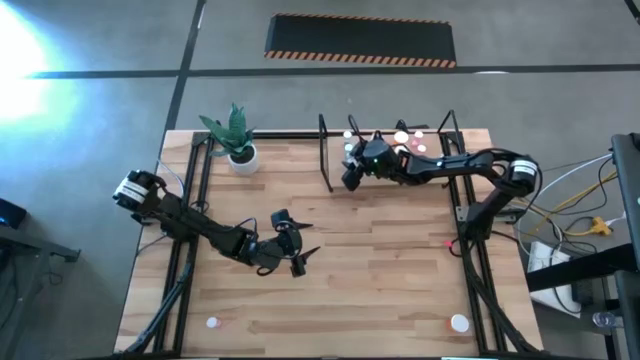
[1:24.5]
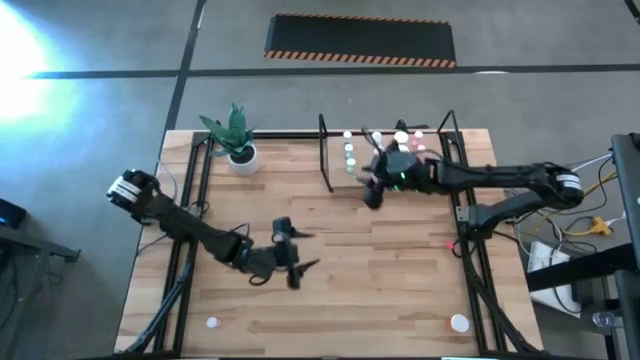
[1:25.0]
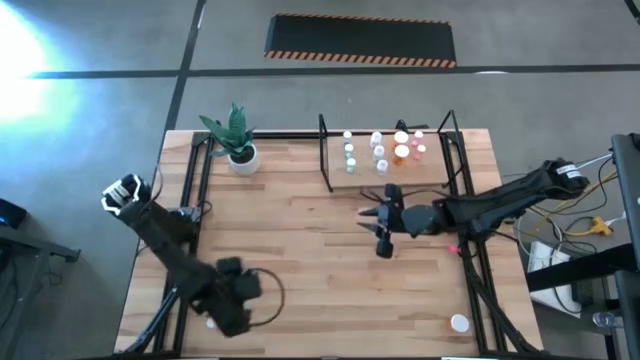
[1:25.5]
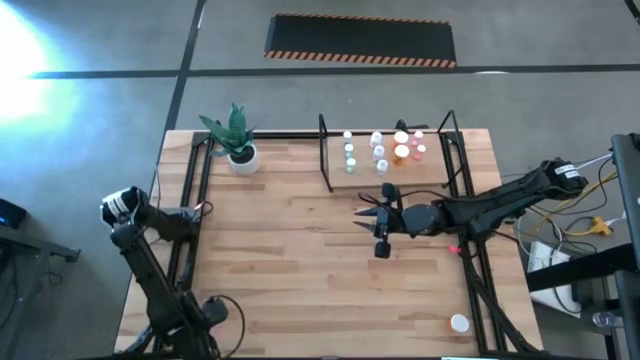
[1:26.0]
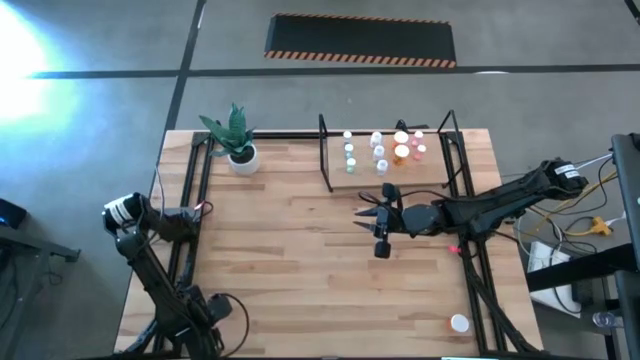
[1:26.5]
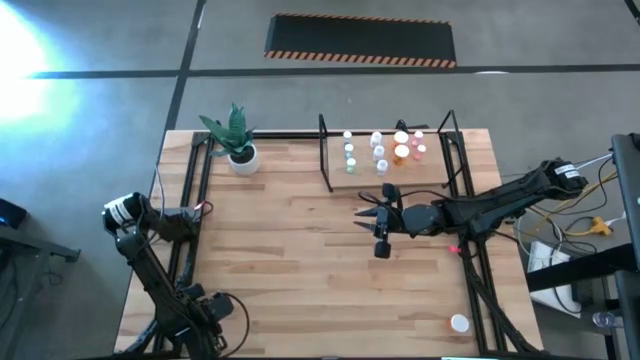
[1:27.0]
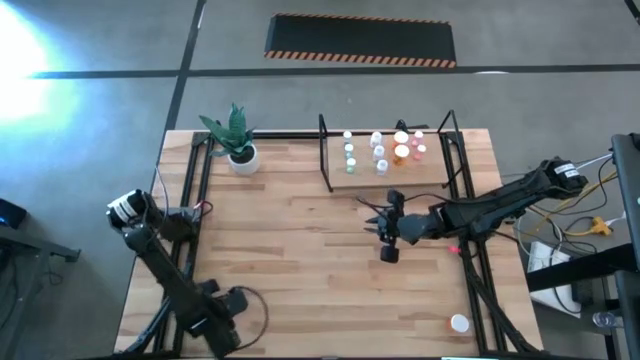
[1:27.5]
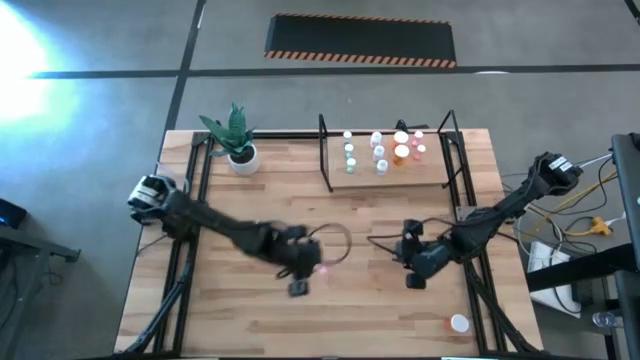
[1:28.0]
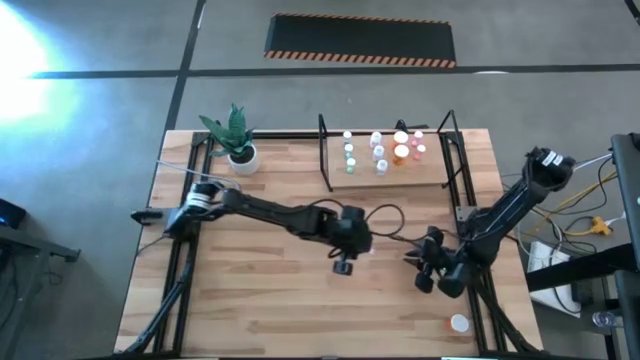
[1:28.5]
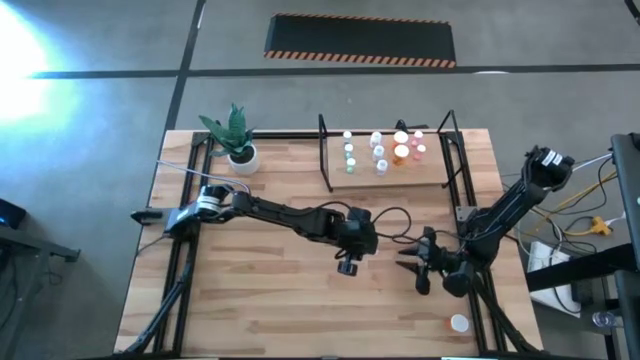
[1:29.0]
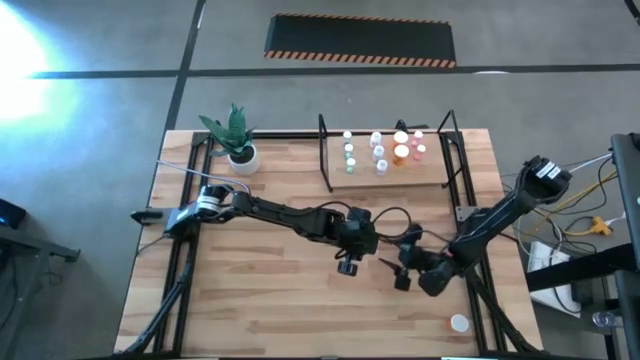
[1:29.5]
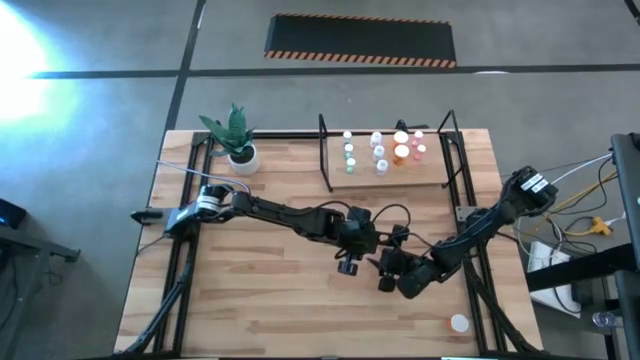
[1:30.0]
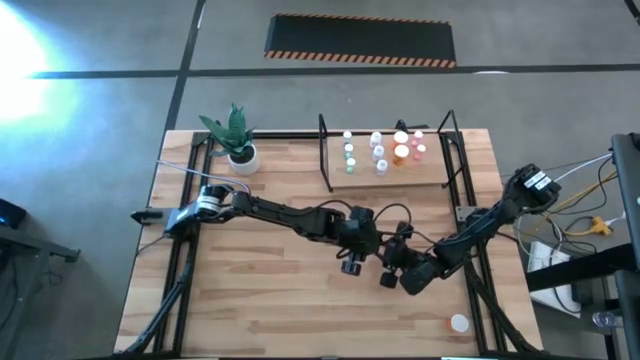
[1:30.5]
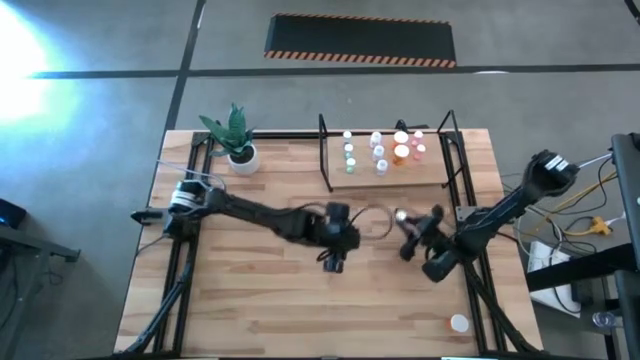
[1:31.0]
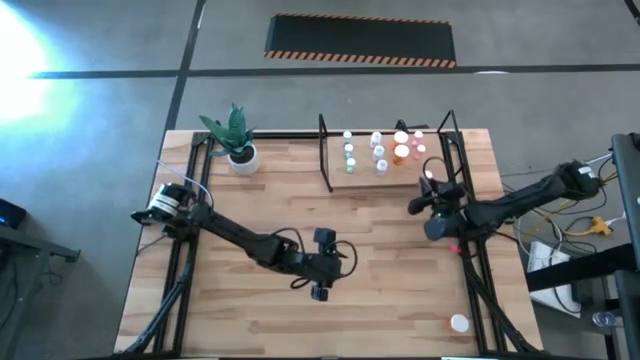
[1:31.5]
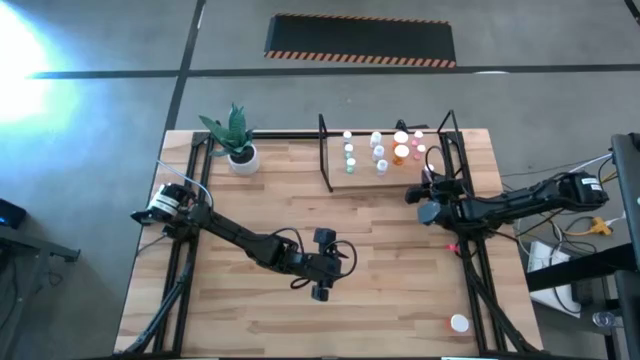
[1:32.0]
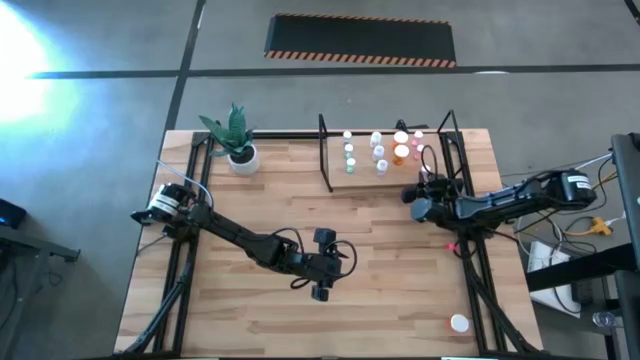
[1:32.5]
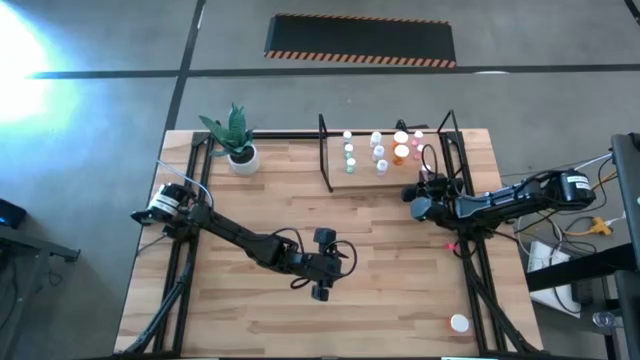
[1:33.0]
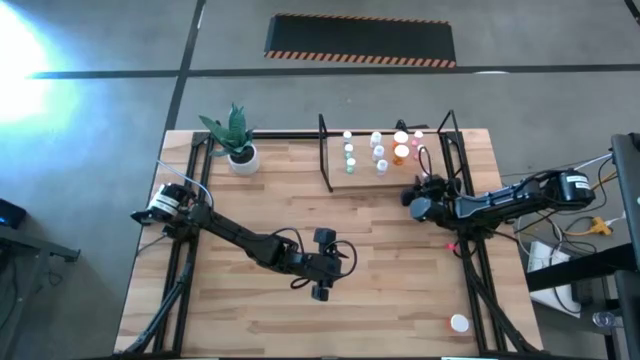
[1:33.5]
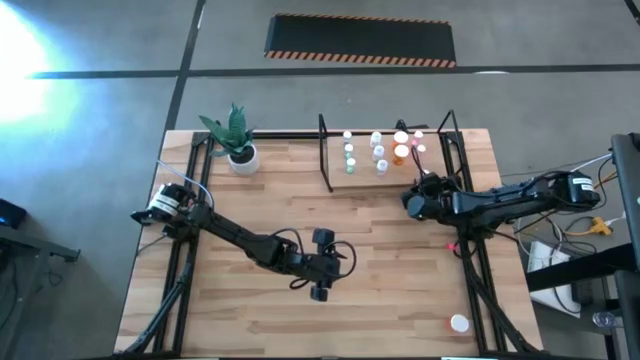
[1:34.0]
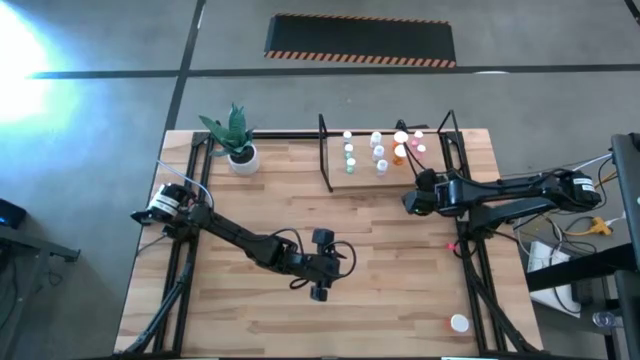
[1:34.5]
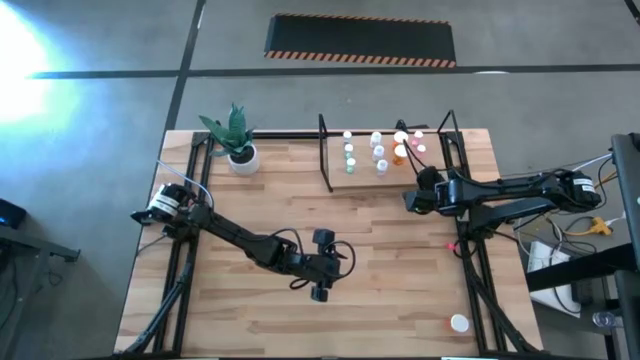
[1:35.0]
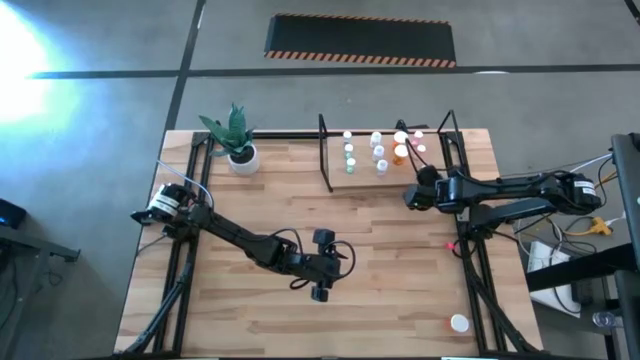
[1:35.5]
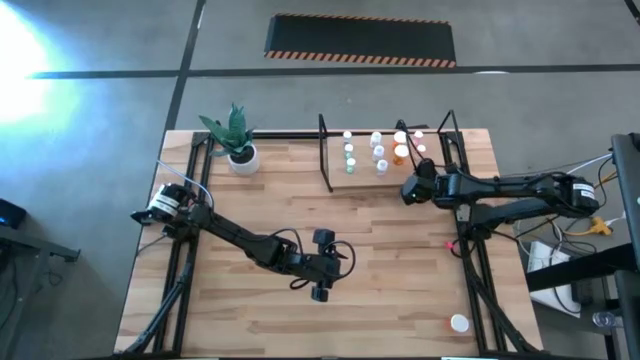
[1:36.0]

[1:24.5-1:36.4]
Task: Pick and place medicine bottles onto shelf by color
Put the pink pill bottle on the shelf aligned with the other pink pill bottle

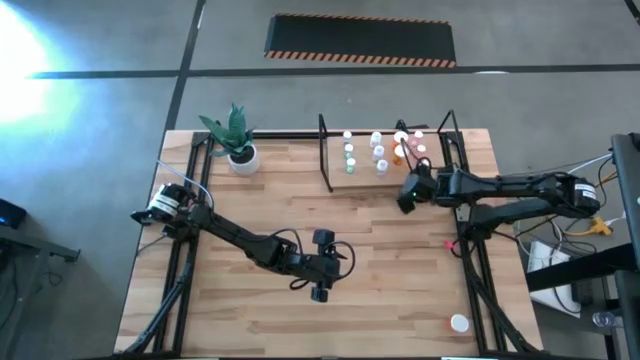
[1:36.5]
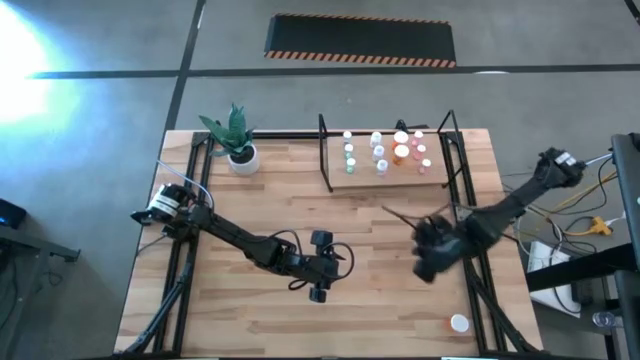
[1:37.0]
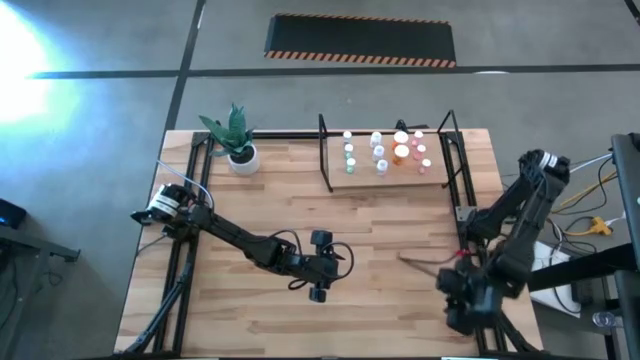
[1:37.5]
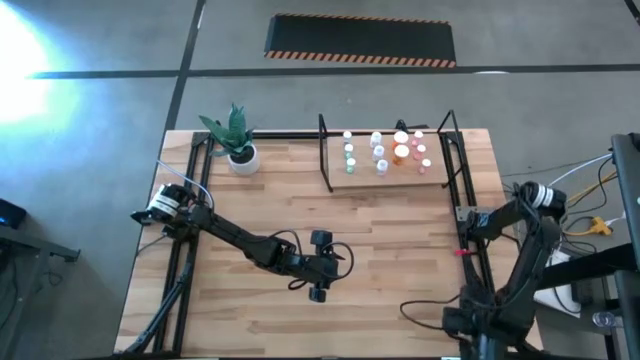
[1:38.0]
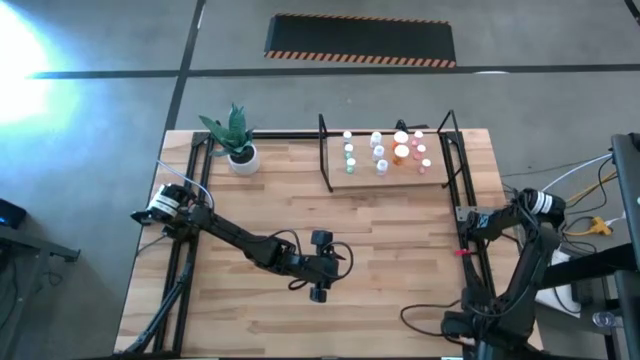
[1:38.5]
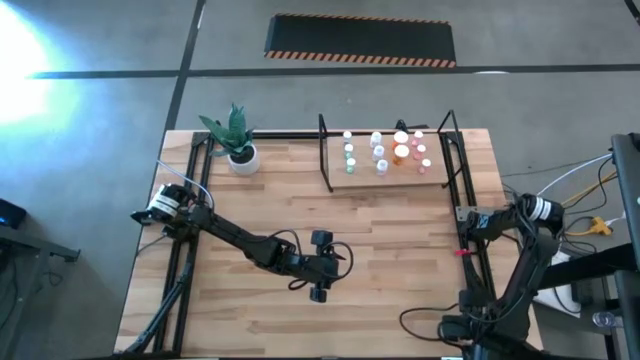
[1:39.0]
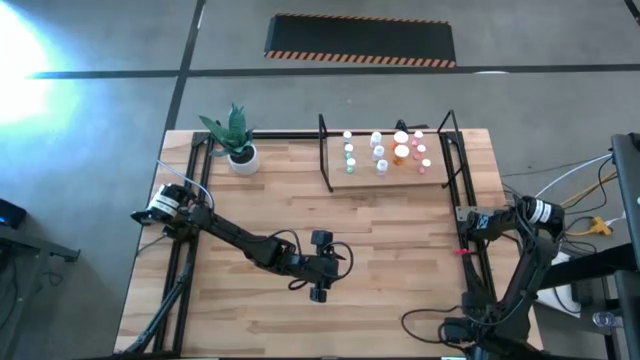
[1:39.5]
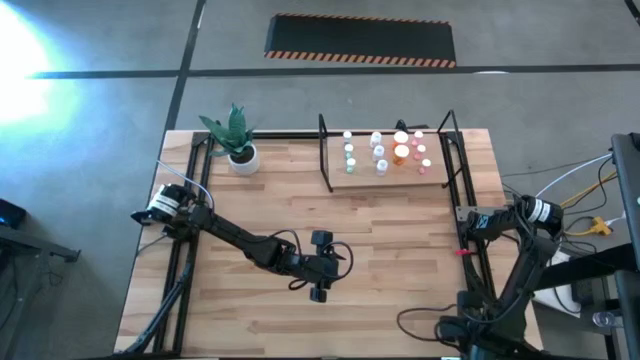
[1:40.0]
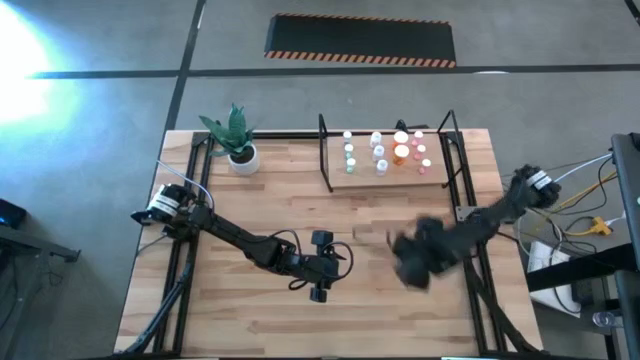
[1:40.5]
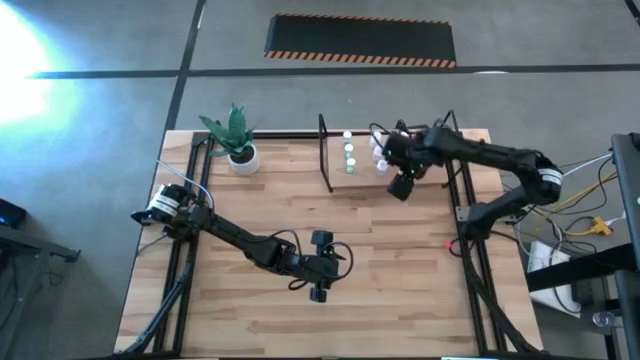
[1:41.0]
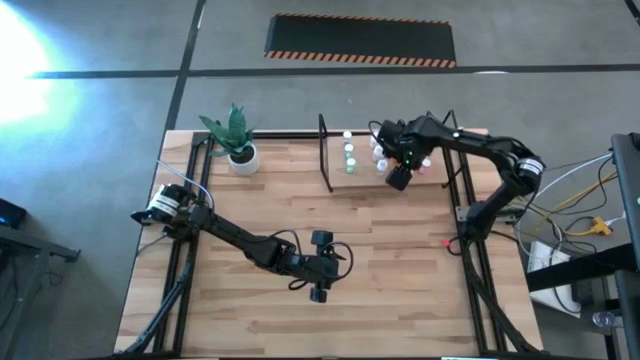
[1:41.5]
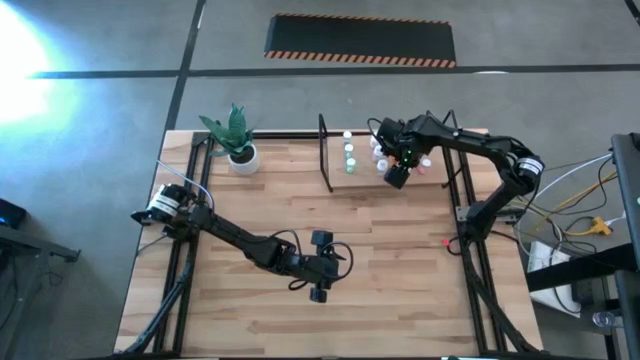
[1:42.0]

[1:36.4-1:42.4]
Put the orange pill bottle on the shelf aligned with the other orange pill bottle

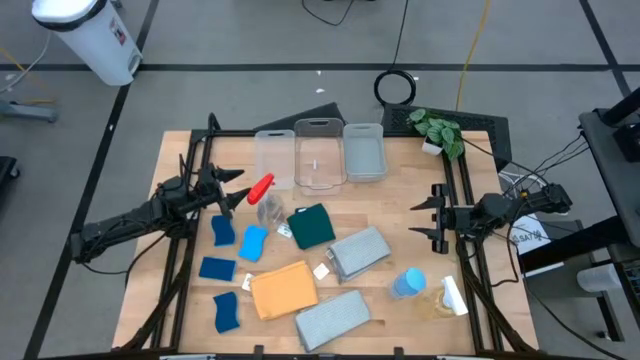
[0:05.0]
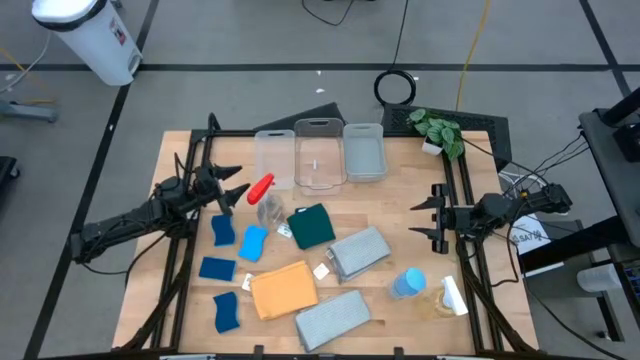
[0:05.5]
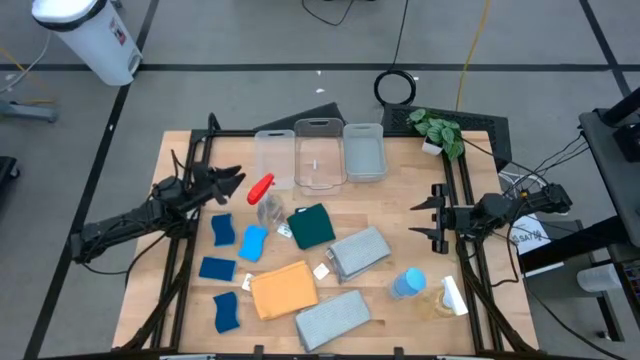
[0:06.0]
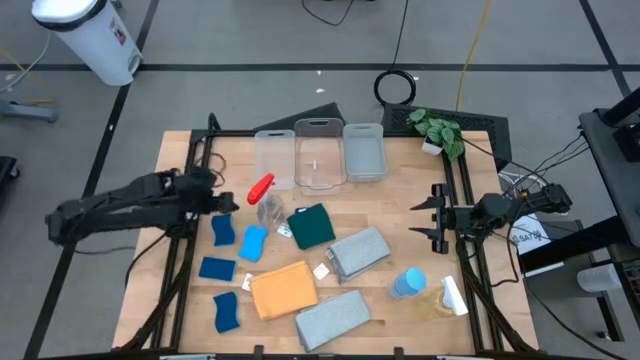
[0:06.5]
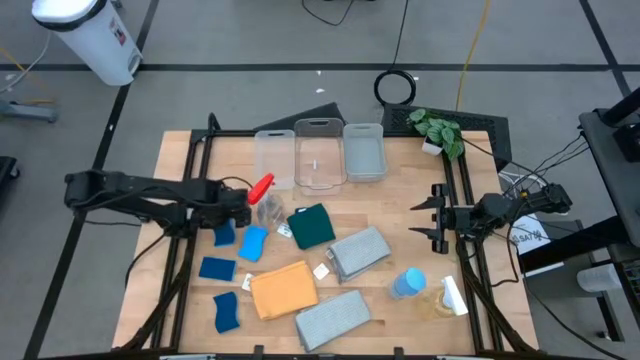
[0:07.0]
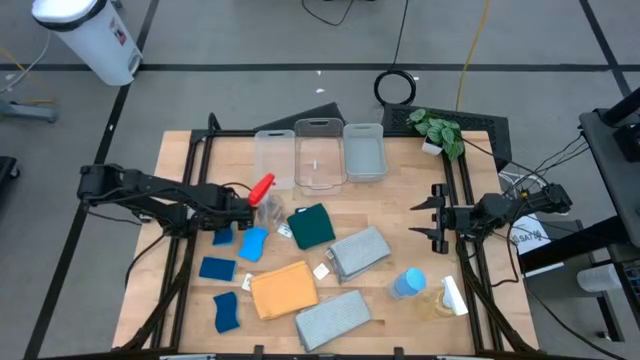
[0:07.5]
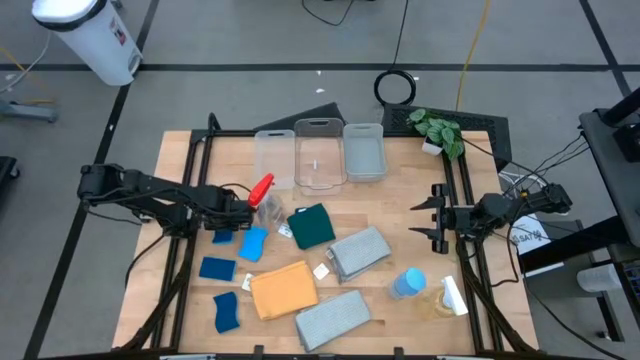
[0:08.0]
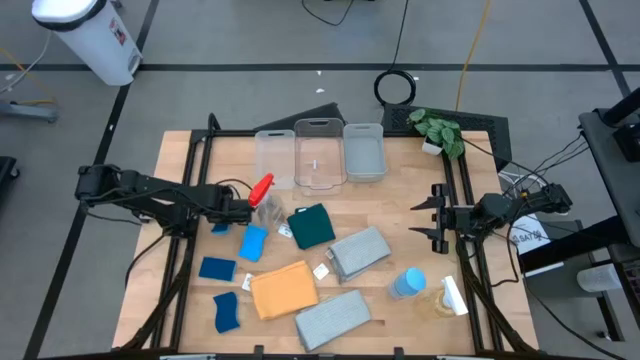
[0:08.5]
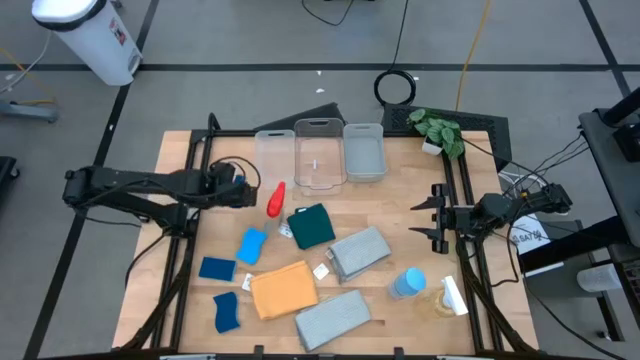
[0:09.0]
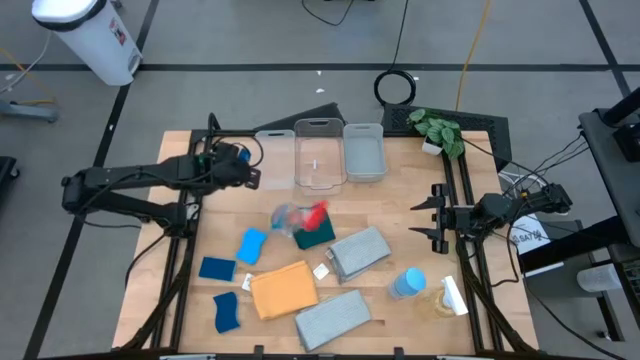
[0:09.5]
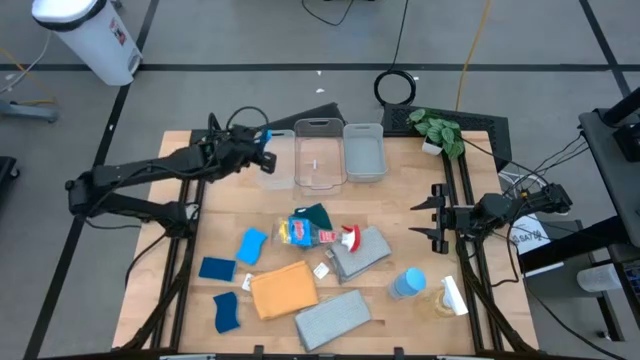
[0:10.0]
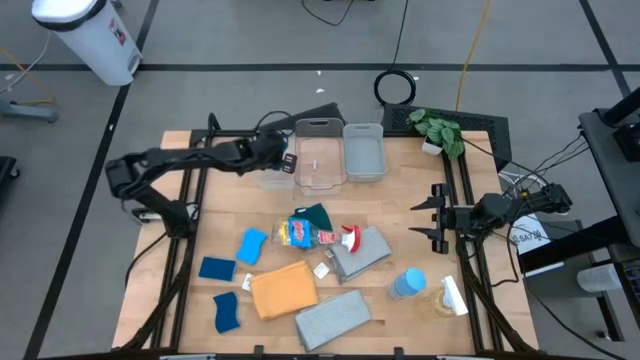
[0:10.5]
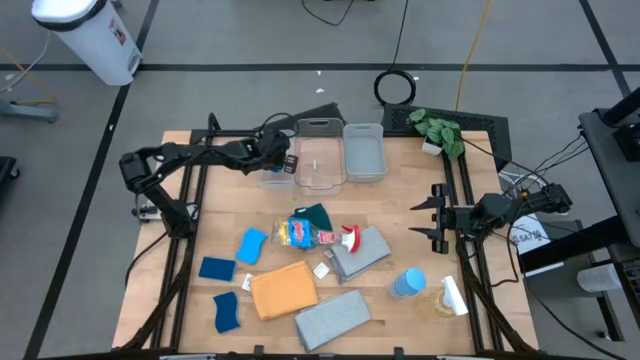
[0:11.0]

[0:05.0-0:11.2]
Task: Pick & Place Kitchen Items
Put the blue sponge into the white transparent bin
